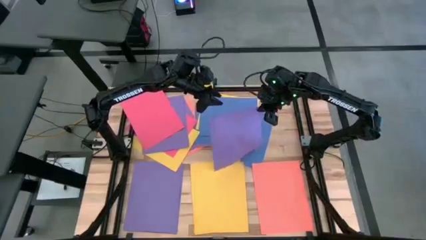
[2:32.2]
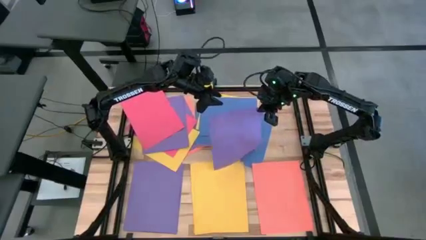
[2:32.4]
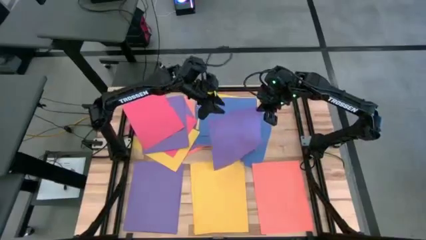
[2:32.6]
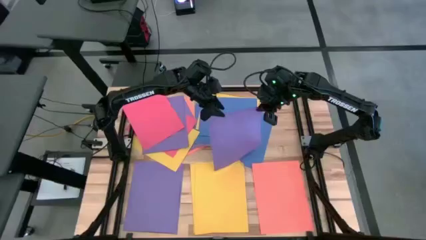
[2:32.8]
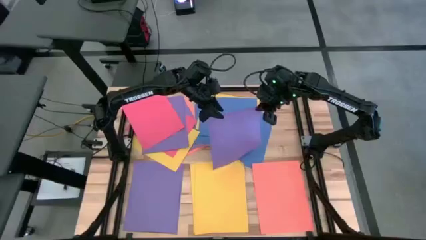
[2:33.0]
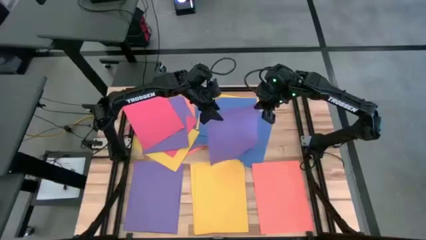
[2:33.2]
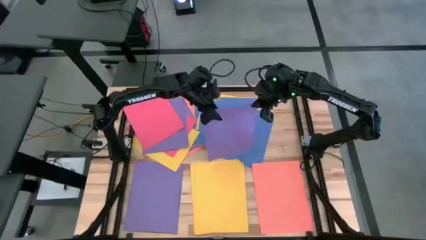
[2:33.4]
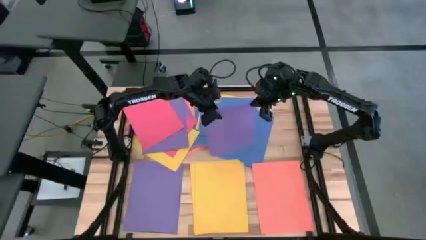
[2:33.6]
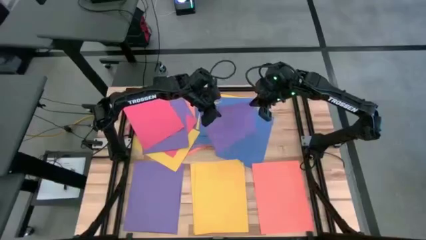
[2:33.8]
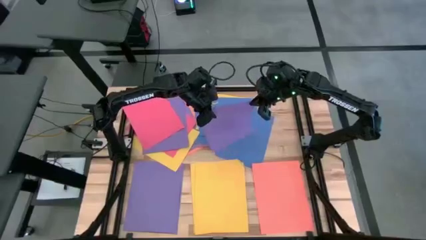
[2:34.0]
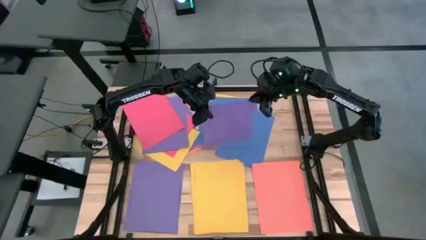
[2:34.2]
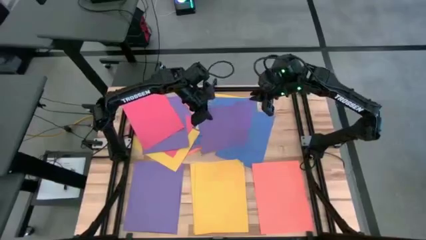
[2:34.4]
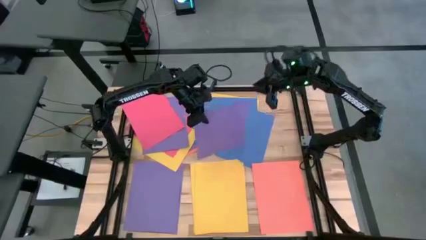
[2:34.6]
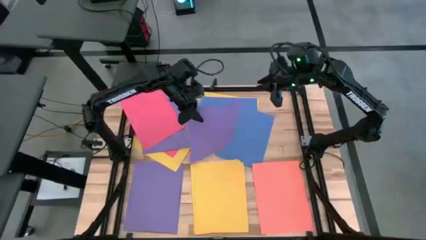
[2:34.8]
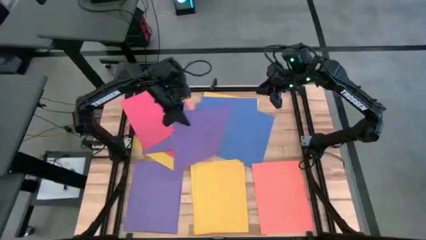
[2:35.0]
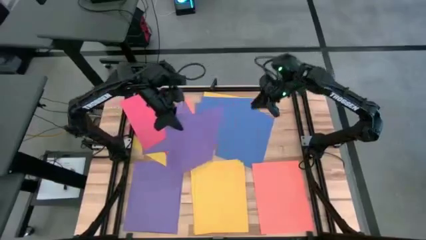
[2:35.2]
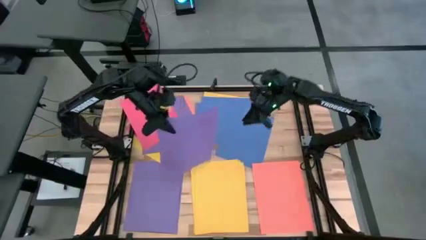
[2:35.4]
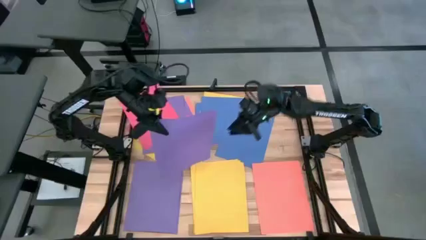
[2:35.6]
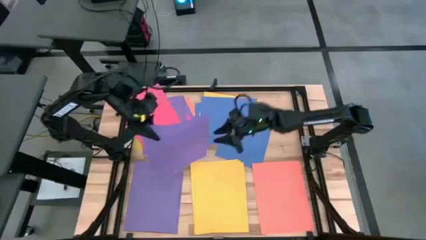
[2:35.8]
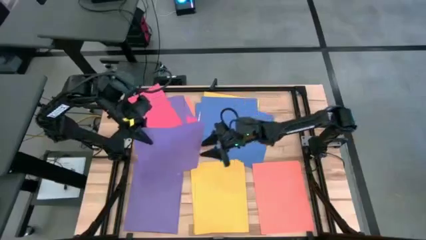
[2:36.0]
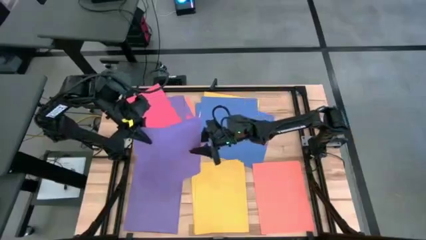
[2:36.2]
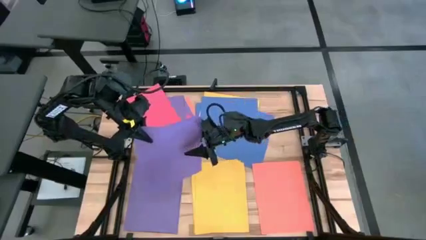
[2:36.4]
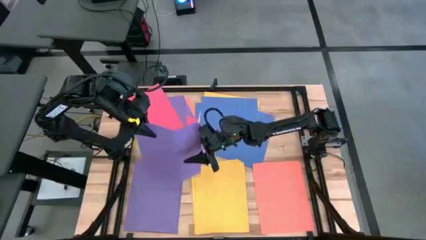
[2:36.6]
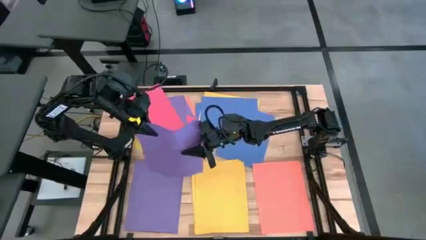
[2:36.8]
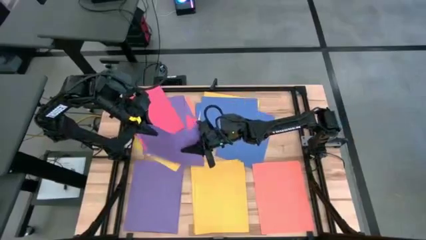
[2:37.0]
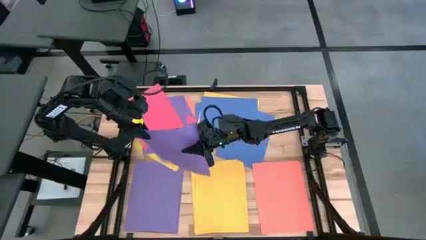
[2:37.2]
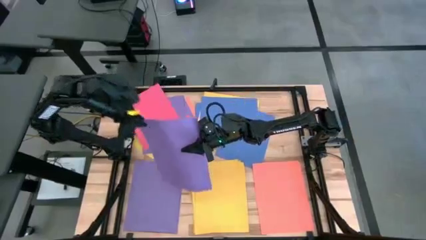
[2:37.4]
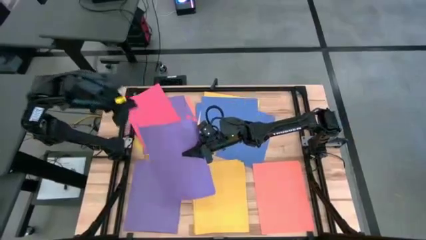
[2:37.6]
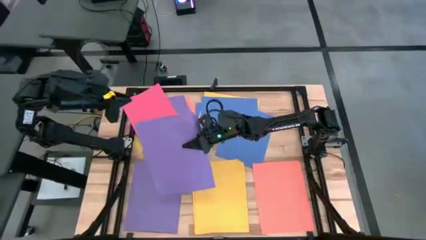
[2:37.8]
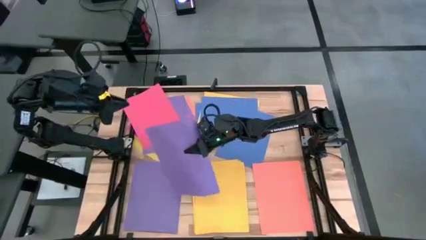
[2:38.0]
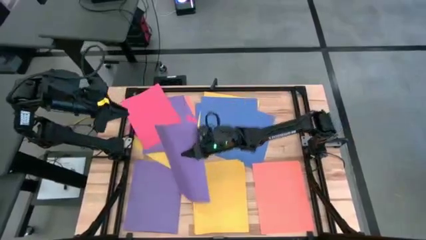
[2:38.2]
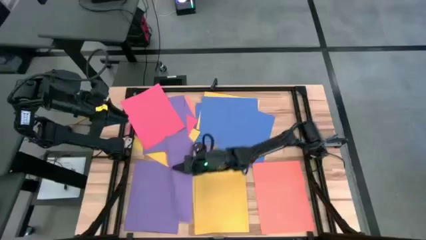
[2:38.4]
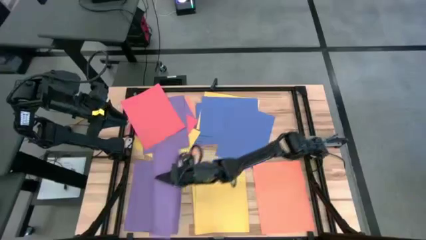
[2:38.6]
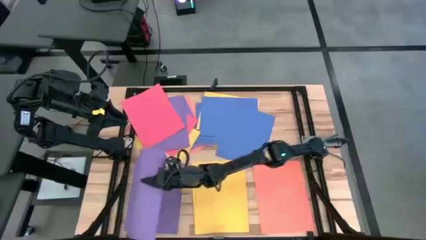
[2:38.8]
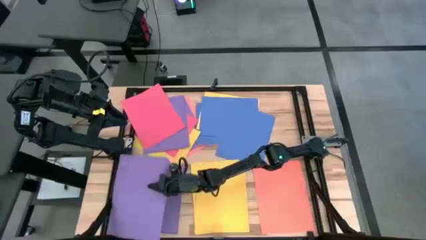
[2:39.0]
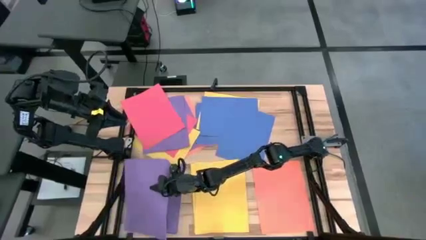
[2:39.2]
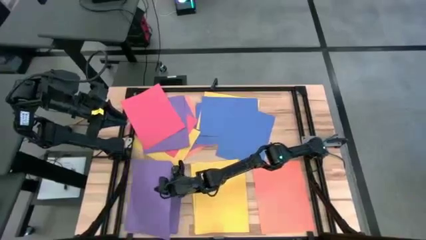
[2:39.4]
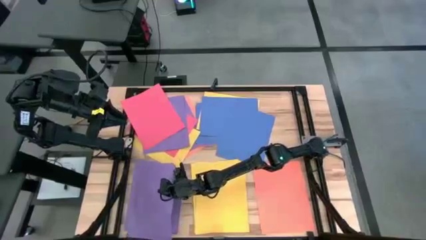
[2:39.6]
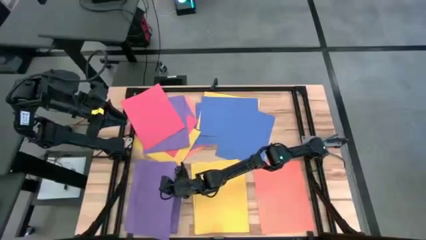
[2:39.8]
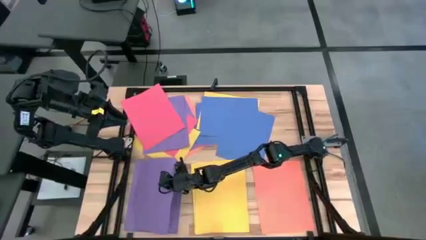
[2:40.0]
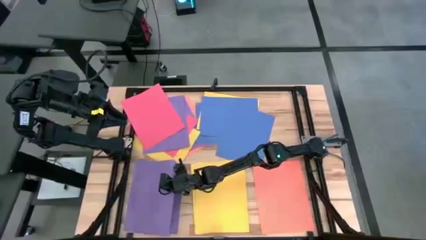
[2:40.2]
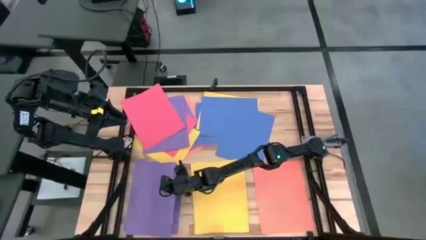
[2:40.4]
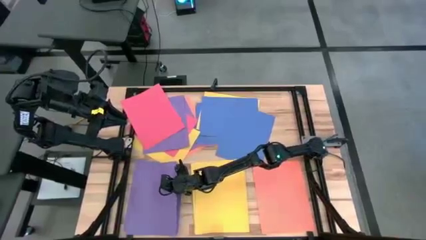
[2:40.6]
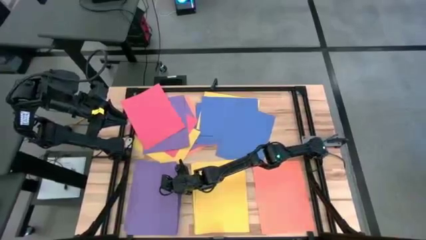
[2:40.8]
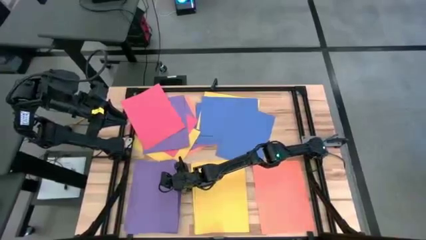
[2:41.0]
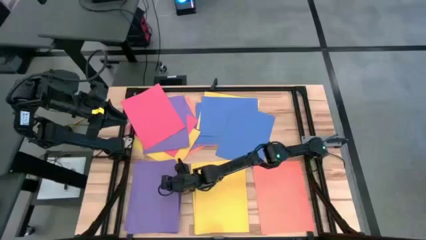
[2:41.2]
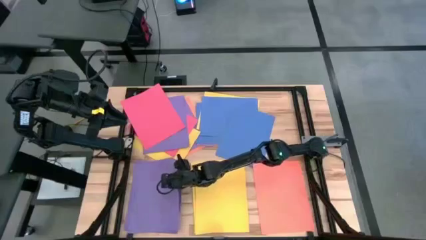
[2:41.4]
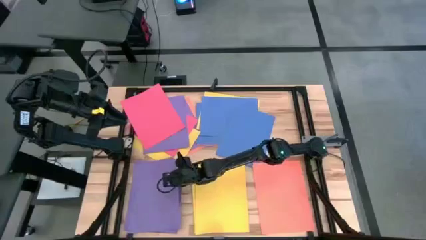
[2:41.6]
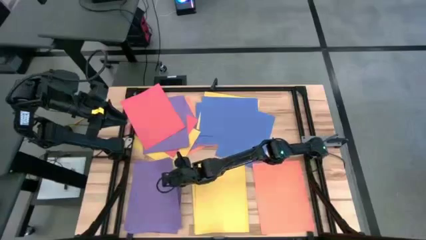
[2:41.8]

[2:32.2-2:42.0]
Task: Organize paper
Stack the purple paper on top of the purple paper

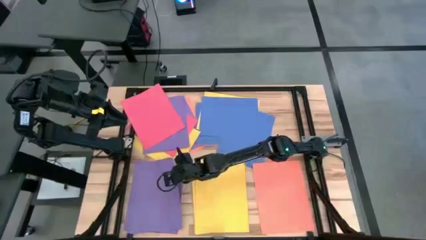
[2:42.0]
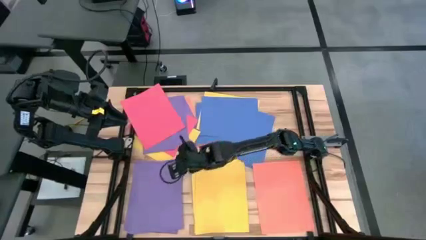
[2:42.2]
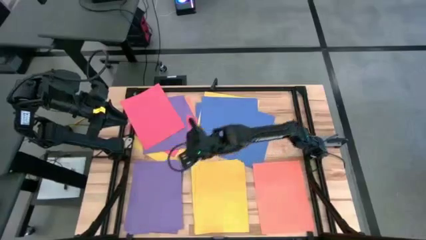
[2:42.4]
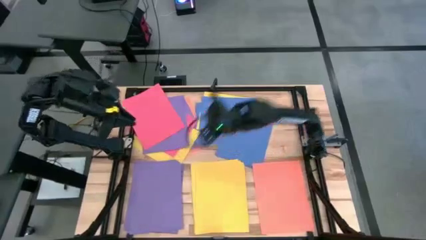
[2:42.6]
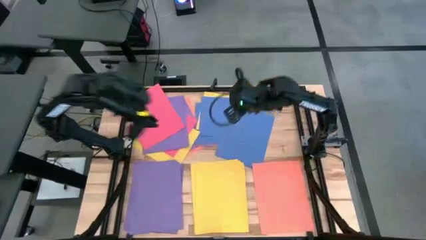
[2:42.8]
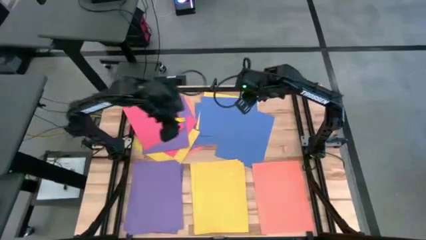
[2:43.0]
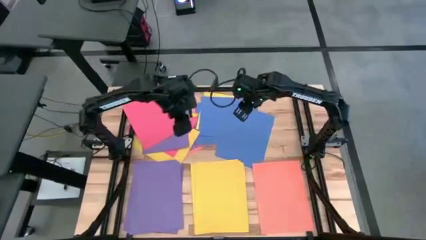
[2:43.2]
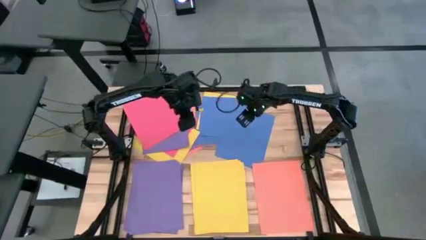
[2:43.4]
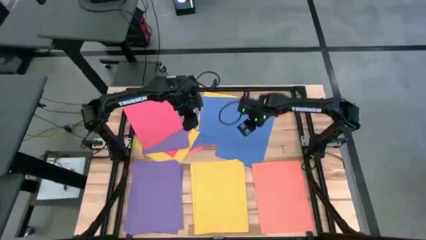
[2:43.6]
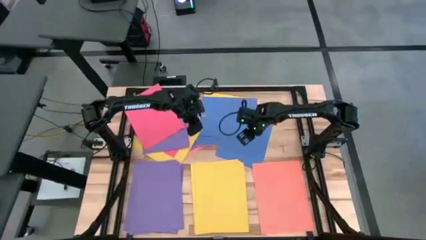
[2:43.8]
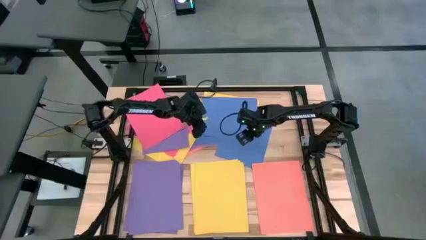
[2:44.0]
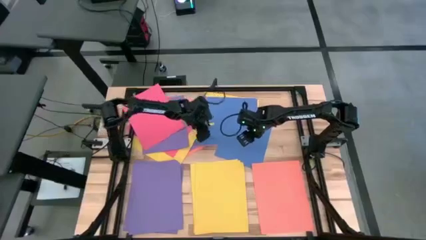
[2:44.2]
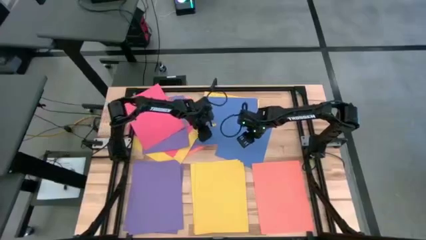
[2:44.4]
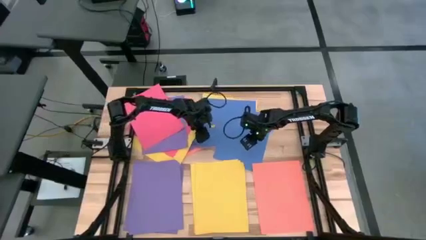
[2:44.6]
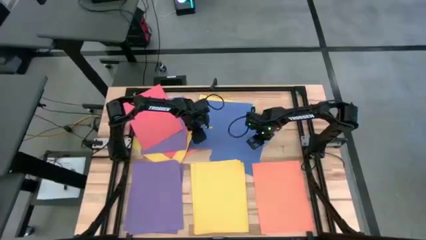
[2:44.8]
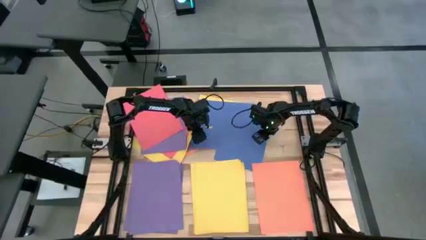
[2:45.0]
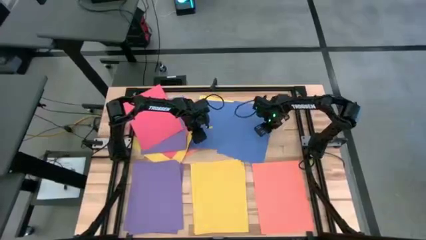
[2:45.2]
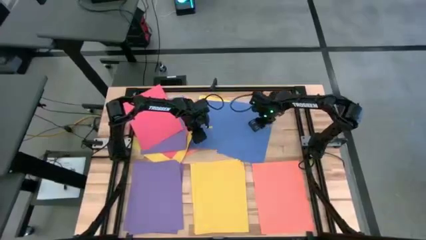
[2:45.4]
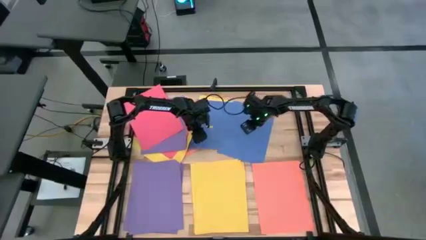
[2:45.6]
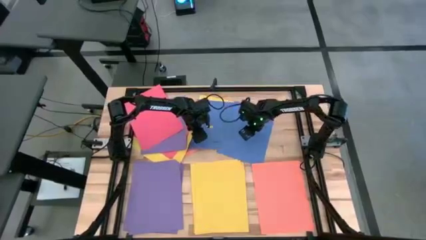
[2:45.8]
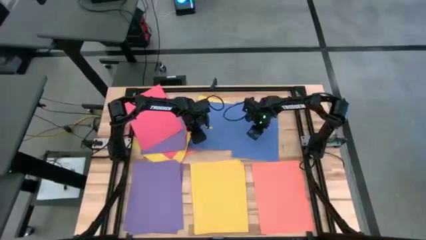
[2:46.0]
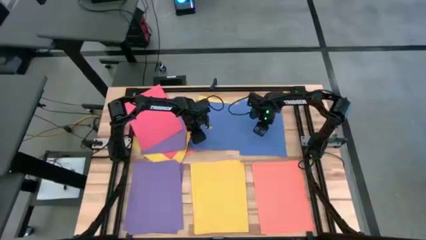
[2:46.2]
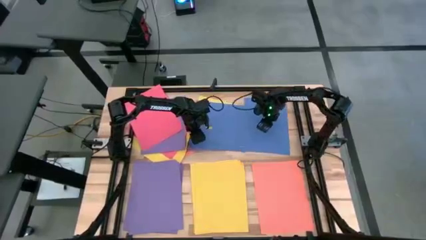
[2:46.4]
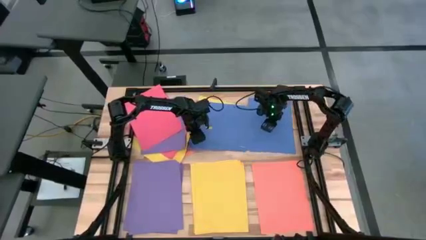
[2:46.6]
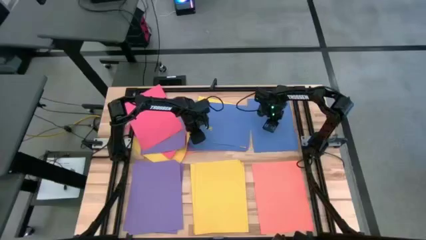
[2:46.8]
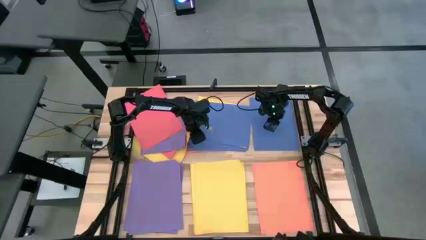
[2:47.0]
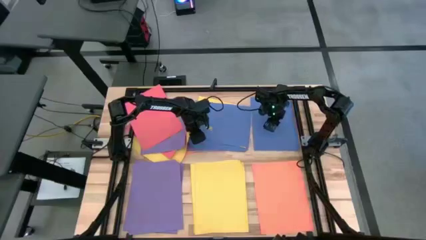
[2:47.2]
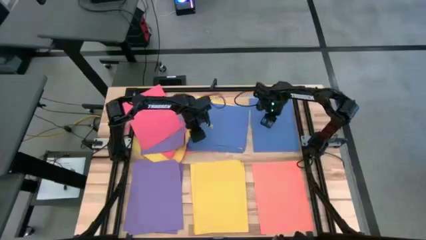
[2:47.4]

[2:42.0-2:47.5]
Move the blue paper to the top right of the table
